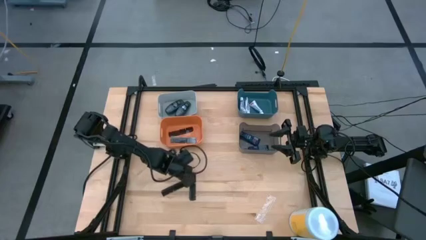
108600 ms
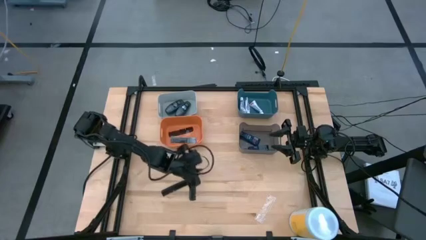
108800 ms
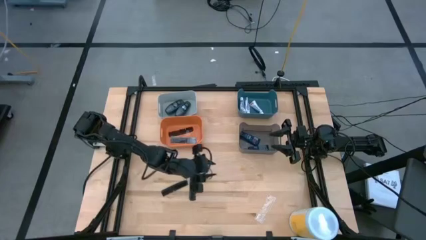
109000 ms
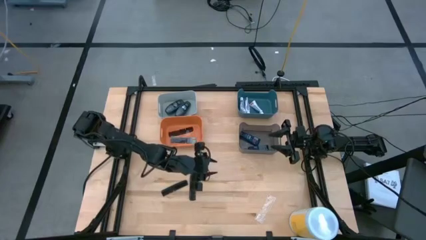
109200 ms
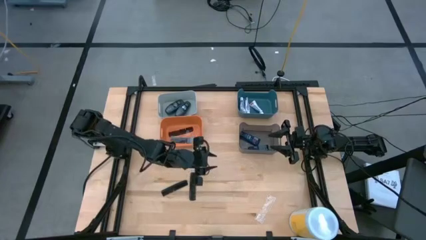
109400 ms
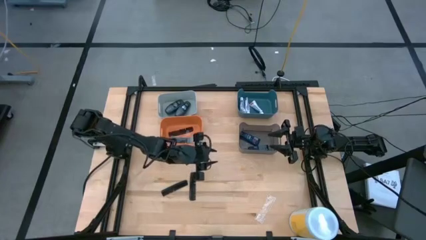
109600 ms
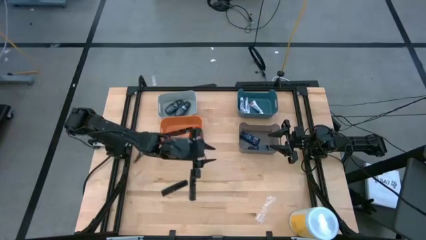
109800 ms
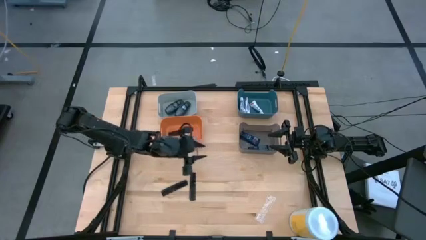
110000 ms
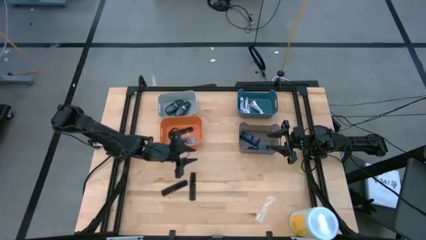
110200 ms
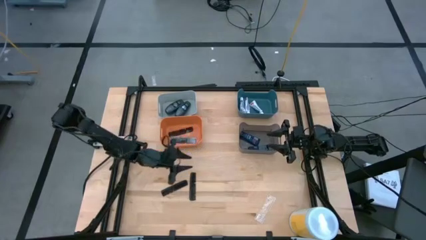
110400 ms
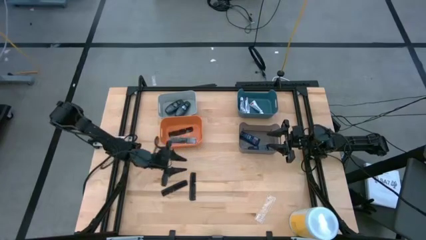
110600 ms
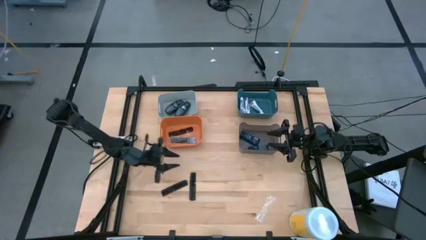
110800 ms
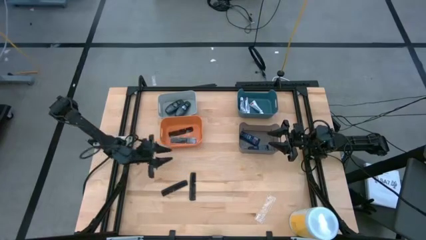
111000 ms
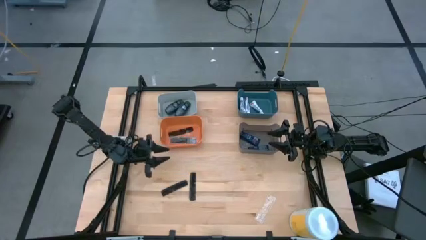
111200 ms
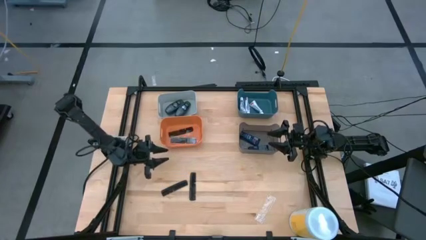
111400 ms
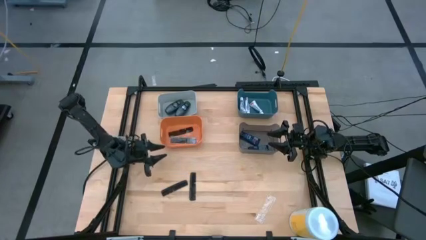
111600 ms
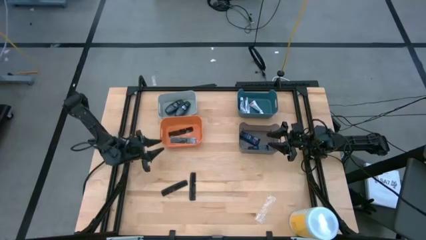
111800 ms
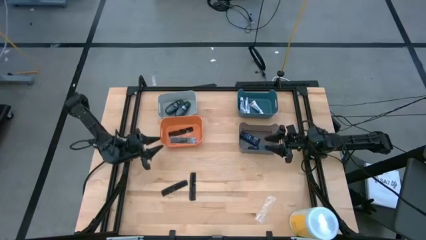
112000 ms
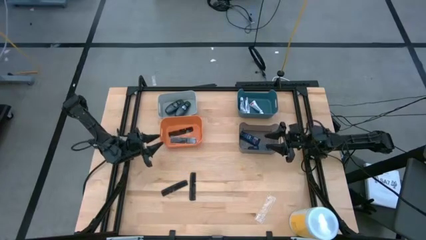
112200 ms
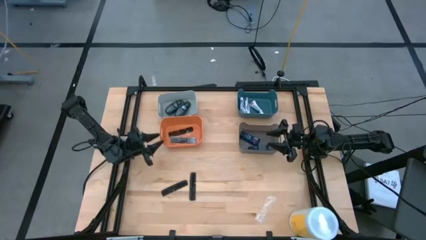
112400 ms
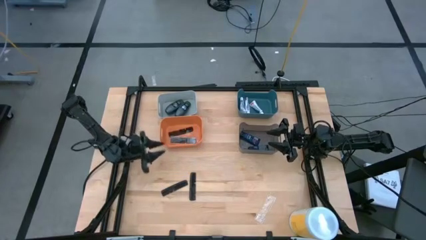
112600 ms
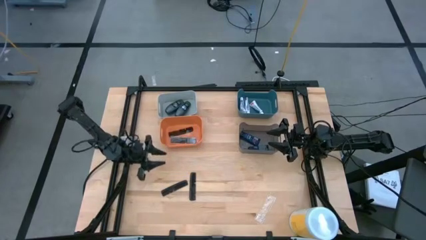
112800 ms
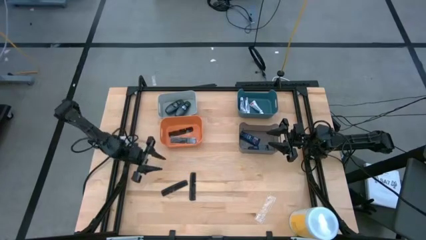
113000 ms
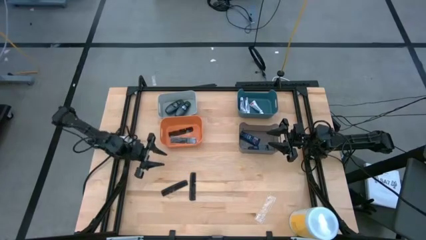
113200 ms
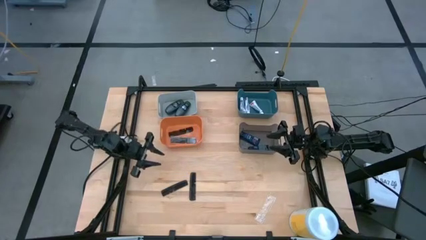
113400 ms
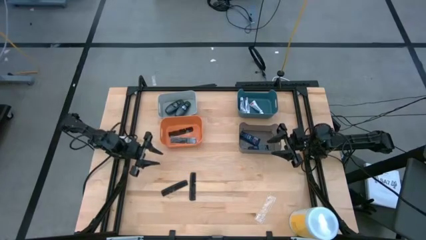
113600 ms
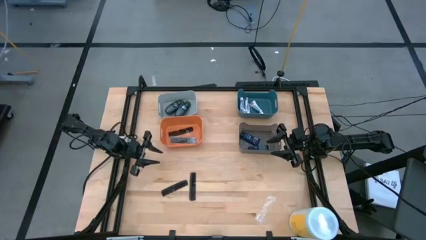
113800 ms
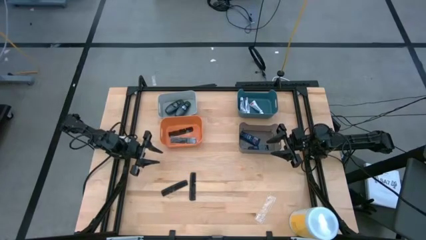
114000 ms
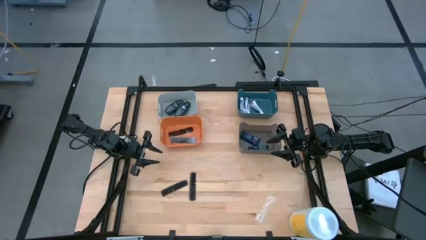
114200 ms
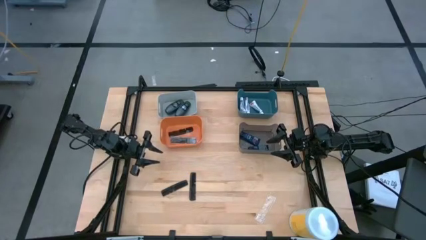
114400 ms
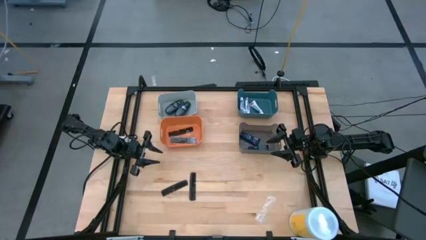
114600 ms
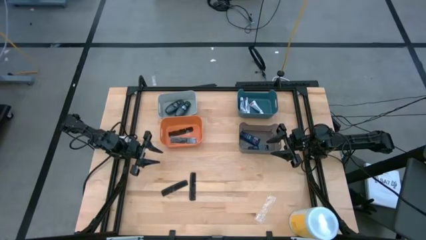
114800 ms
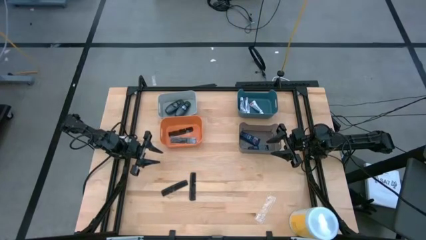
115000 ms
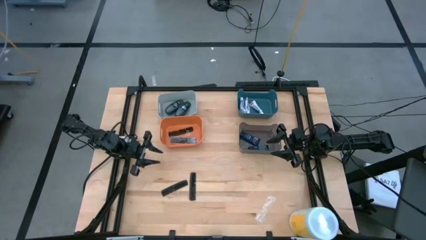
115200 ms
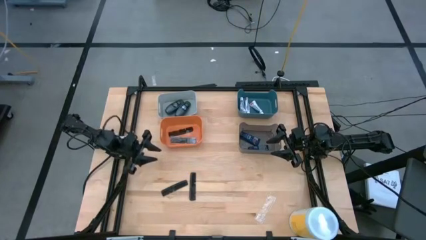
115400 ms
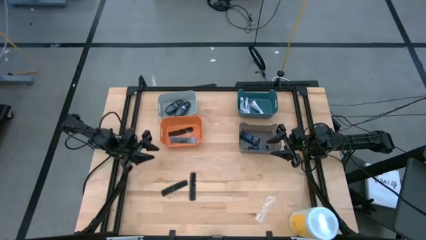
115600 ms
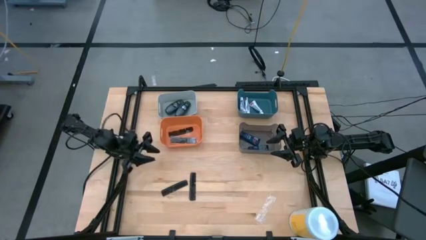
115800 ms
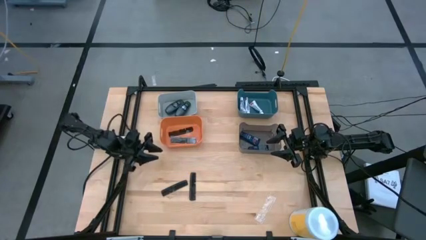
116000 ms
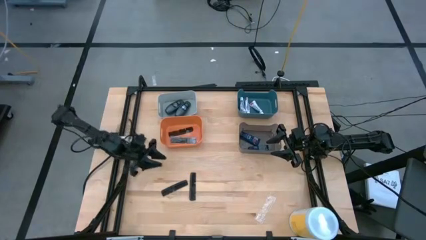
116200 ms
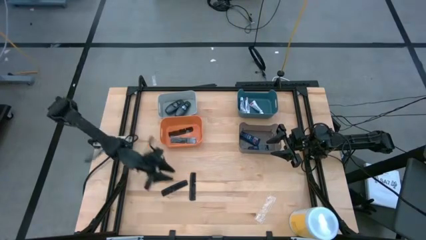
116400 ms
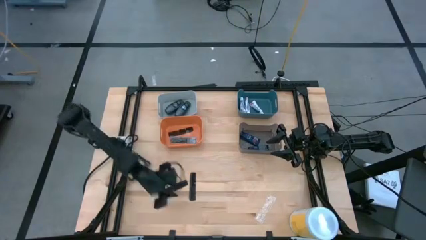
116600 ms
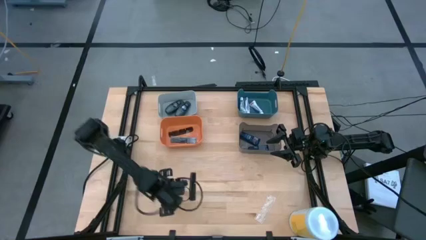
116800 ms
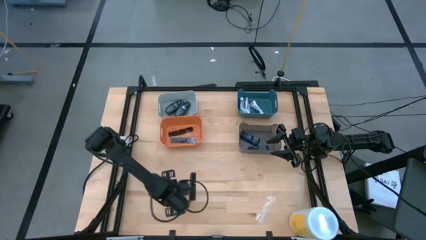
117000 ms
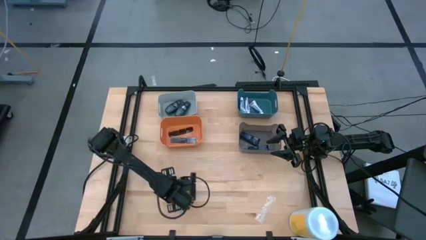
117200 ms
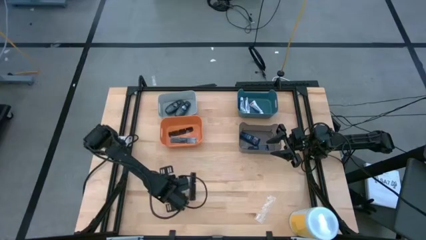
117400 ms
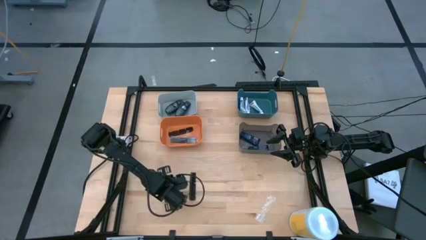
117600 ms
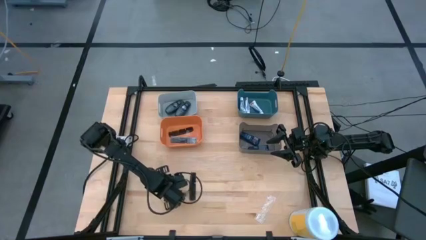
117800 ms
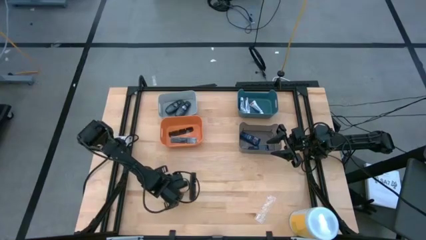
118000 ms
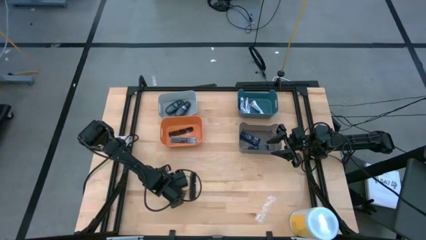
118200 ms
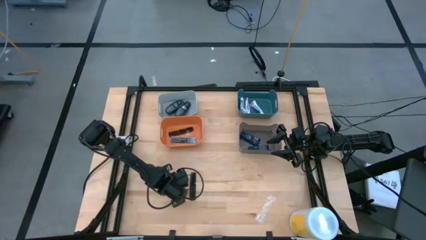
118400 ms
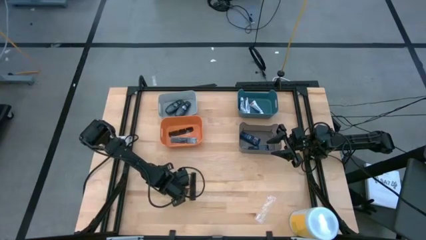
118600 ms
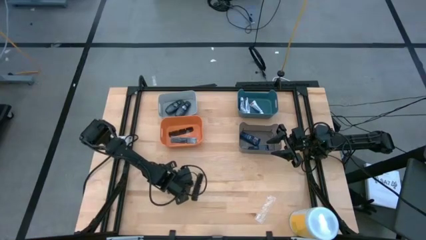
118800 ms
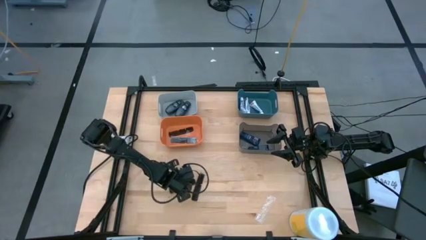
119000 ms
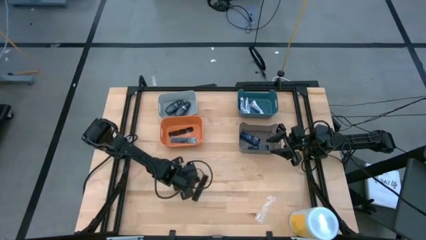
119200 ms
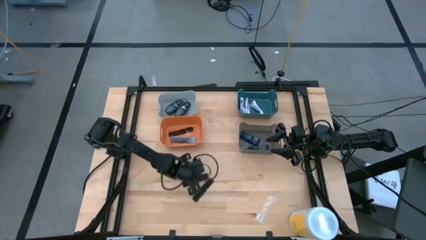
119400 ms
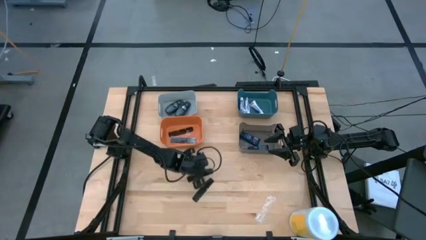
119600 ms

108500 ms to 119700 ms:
Task: Pick & Place Travel size toiletries
Put the black comb into the orange bin

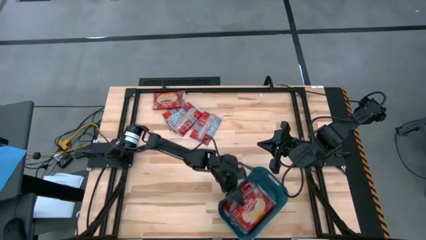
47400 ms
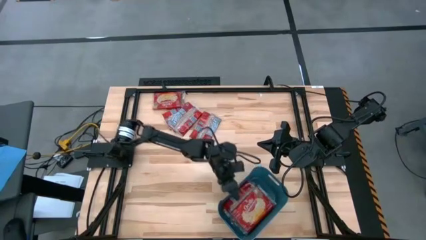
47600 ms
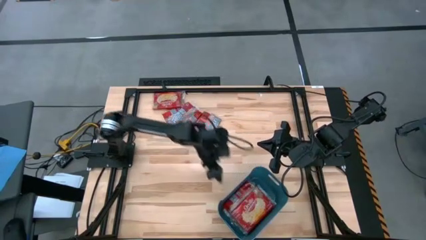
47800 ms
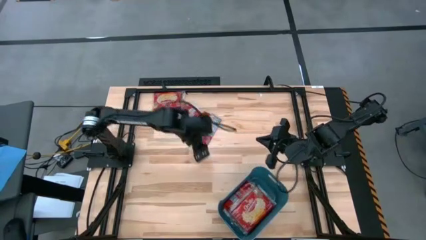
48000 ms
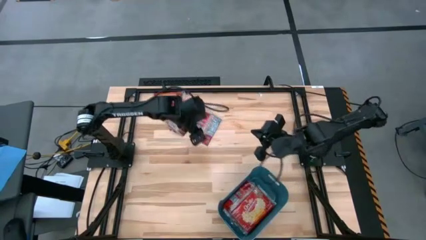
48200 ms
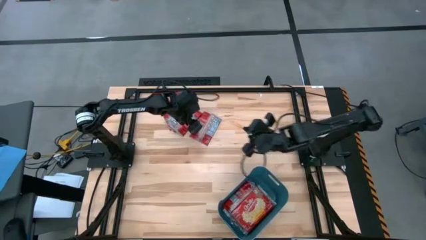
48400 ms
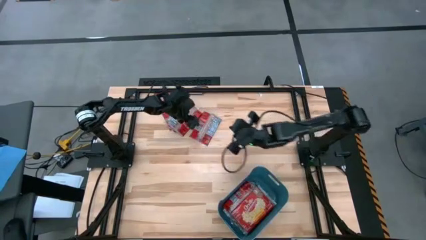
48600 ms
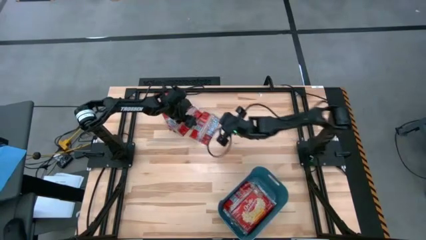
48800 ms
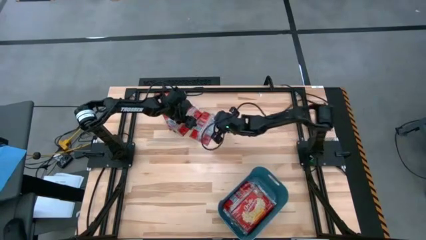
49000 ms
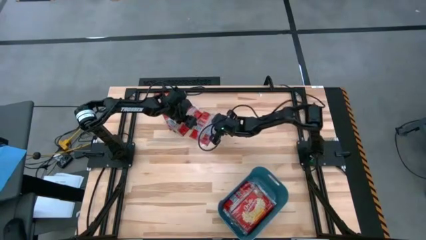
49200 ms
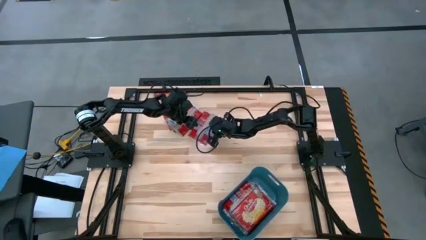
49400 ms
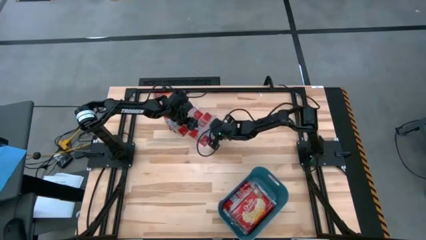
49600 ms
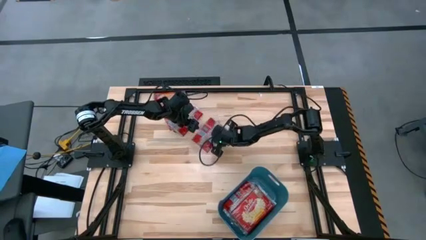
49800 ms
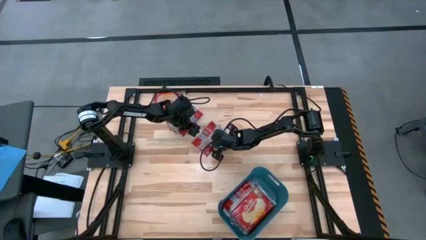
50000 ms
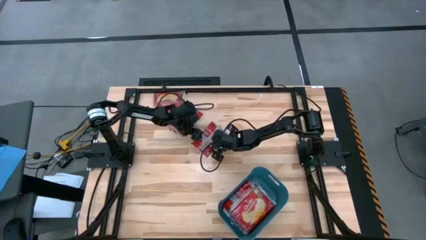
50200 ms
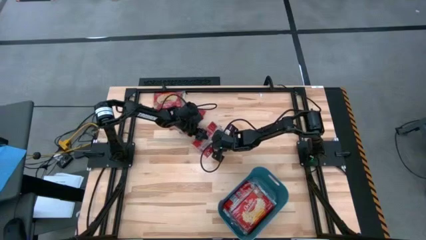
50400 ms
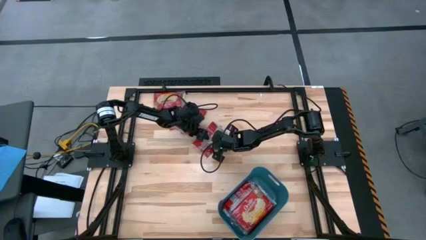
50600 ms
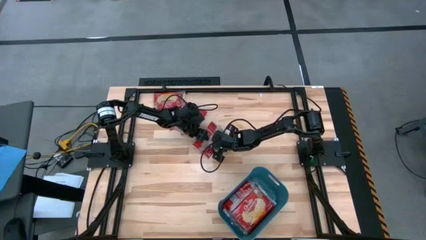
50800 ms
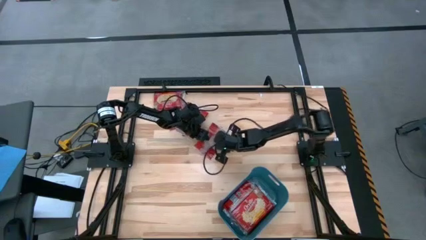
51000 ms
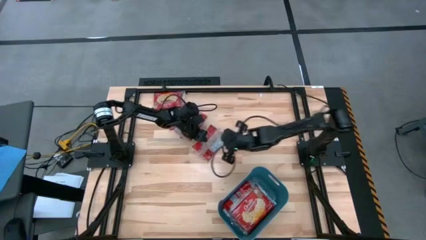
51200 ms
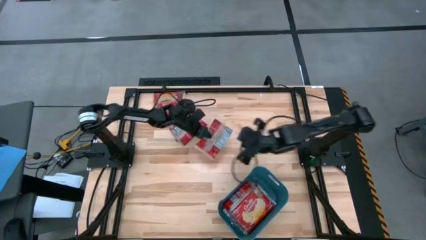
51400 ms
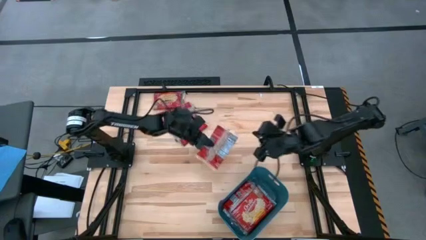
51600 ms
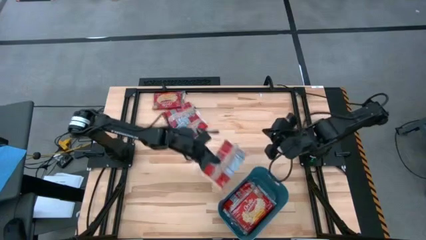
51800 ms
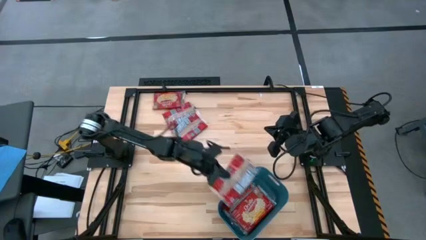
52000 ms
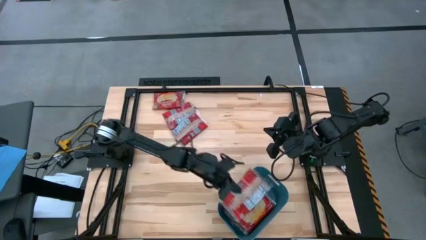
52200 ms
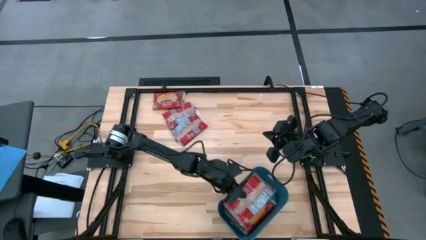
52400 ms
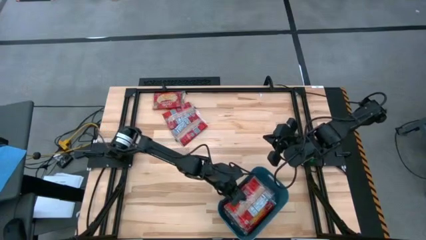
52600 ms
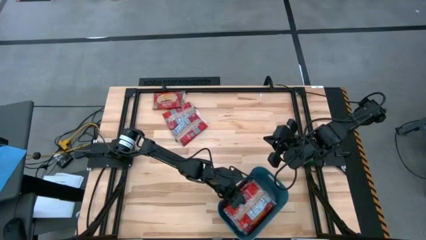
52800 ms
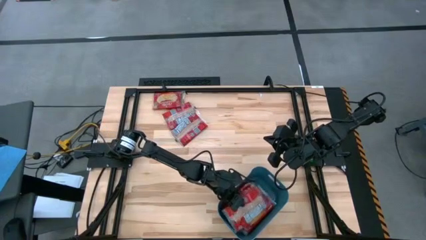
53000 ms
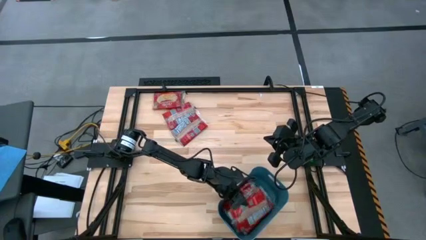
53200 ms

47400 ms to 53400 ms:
Task: Sort popcorn bags into baskets
Put the popcorn bag into the blue container
